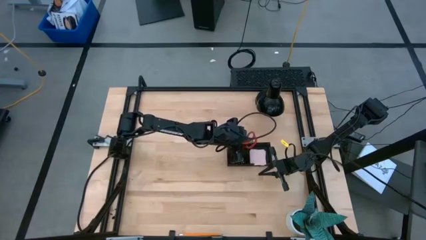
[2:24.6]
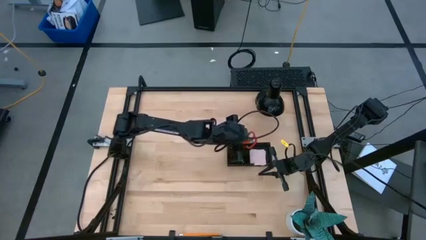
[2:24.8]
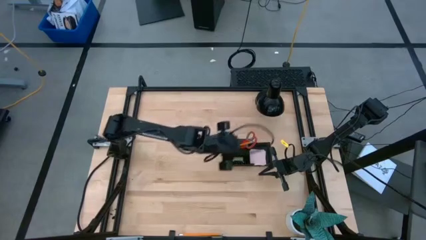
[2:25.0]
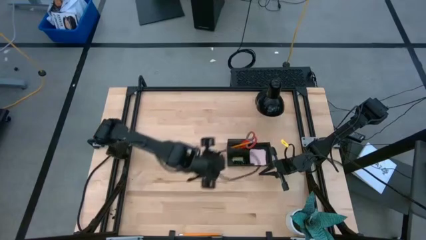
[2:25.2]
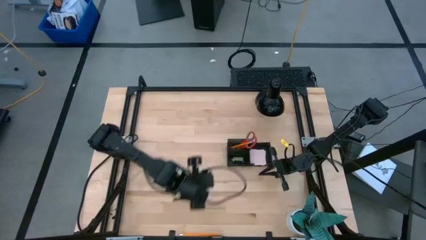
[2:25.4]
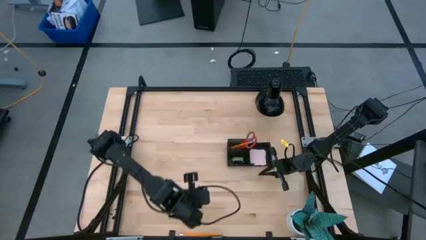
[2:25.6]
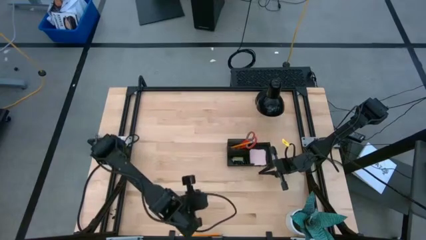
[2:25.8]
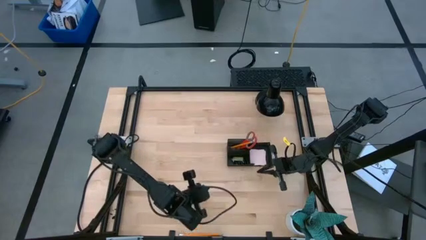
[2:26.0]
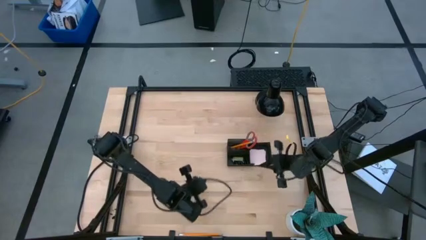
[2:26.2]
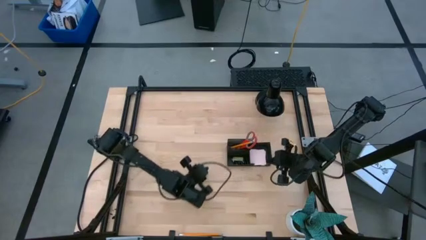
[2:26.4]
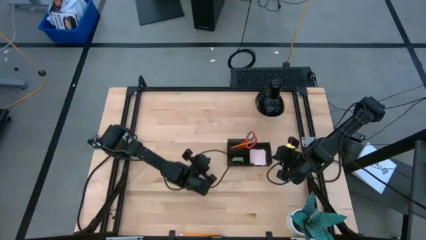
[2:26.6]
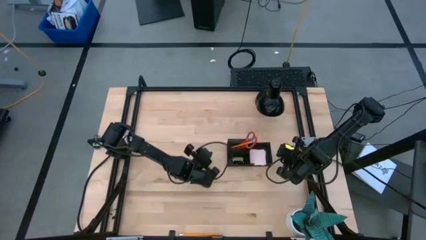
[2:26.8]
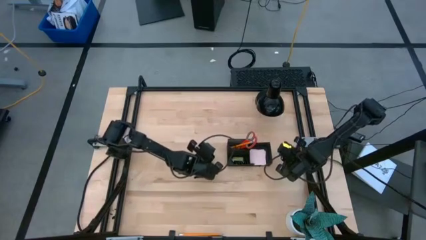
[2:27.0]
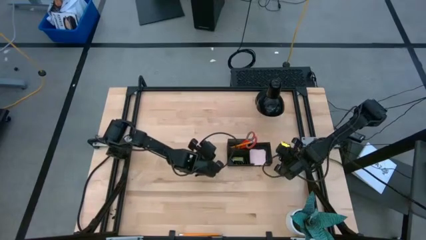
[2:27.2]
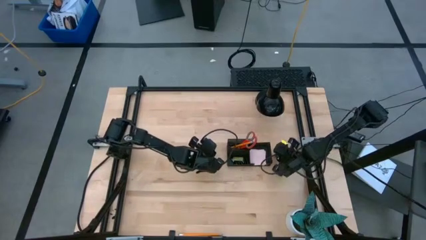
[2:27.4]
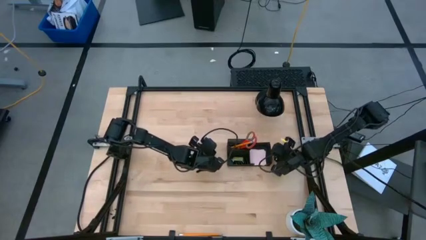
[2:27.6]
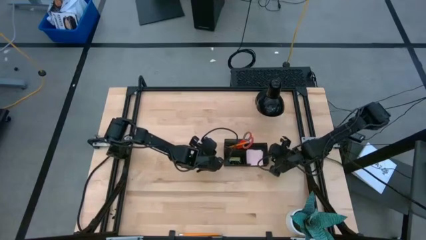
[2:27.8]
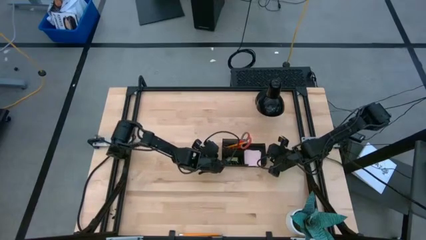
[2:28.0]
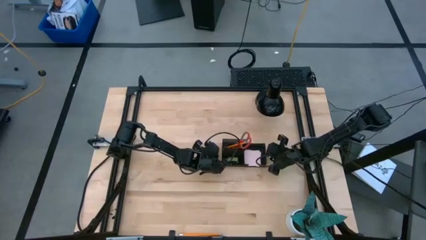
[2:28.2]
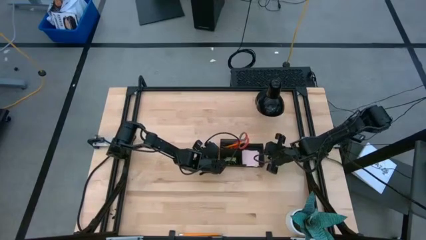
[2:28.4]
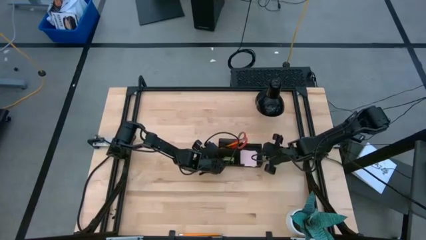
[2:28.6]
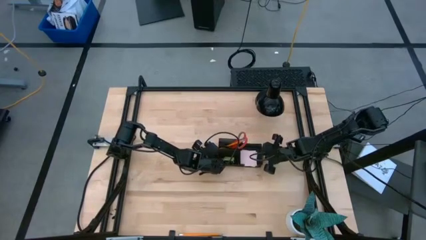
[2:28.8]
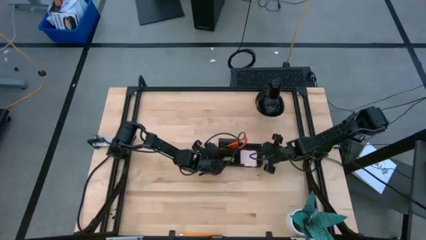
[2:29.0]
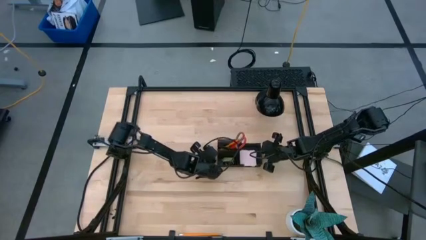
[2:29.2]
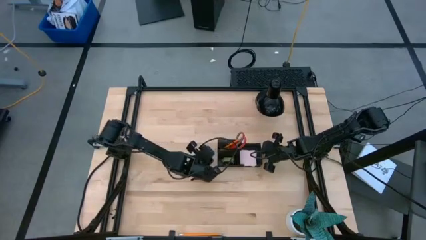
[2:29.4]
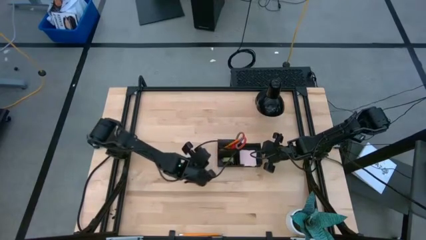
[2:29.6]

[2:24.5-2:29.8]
Task: Pick and place office supplies into organizer
Adjust the black desk organizer

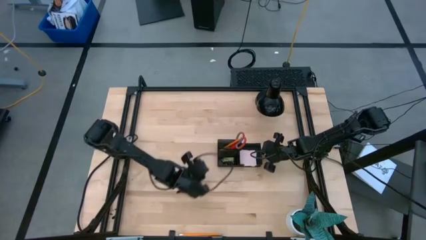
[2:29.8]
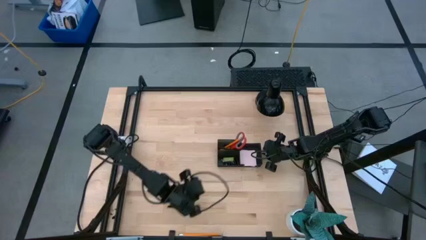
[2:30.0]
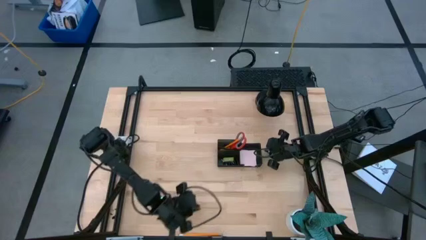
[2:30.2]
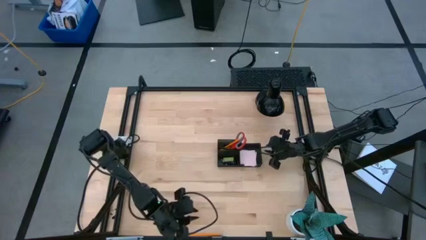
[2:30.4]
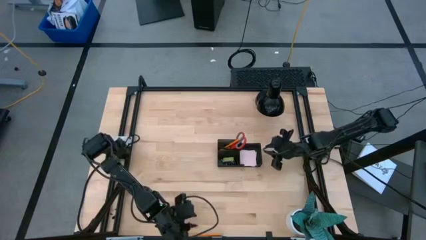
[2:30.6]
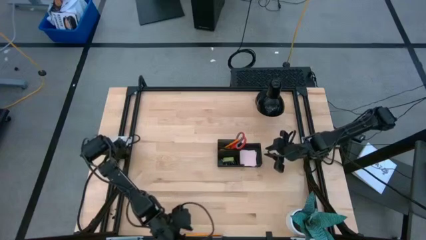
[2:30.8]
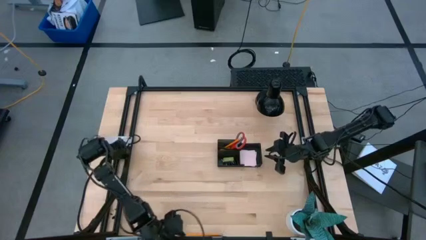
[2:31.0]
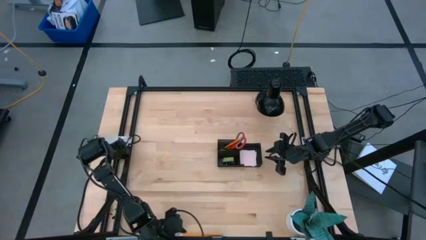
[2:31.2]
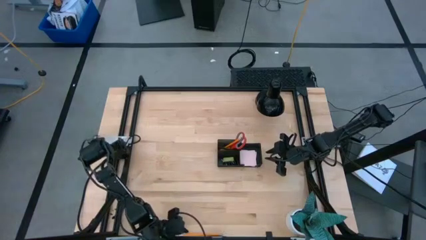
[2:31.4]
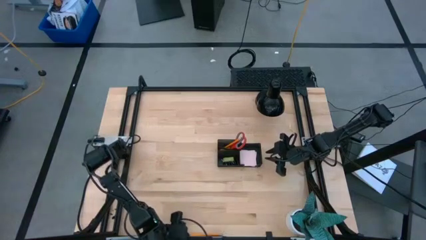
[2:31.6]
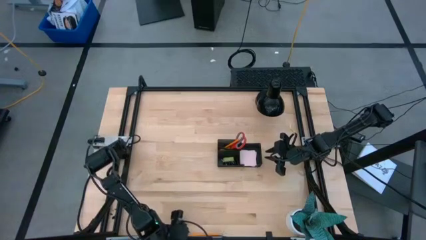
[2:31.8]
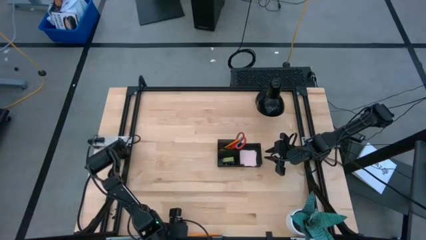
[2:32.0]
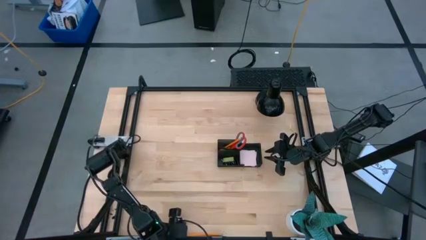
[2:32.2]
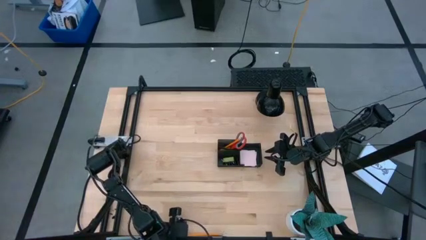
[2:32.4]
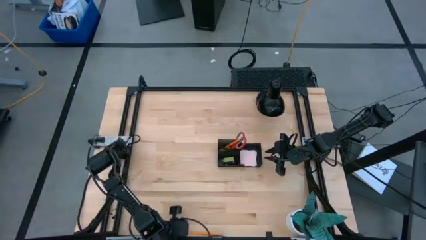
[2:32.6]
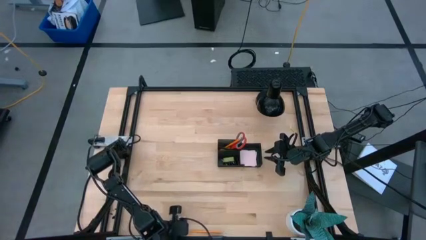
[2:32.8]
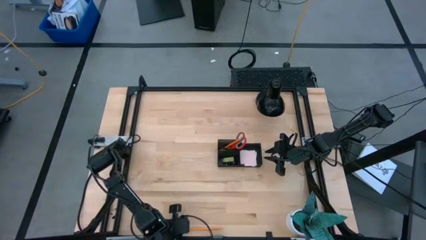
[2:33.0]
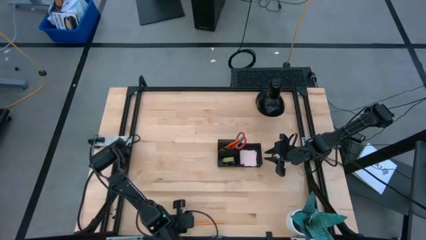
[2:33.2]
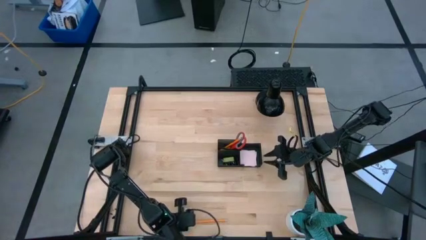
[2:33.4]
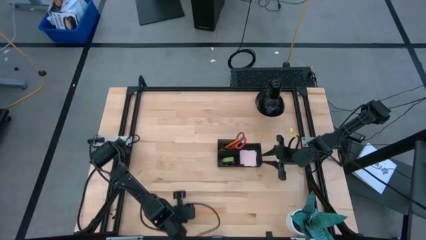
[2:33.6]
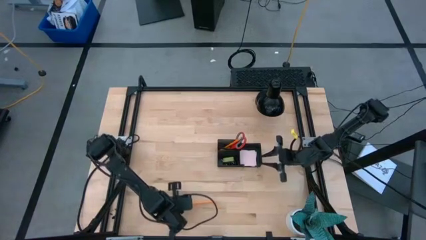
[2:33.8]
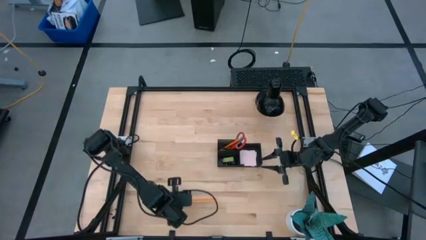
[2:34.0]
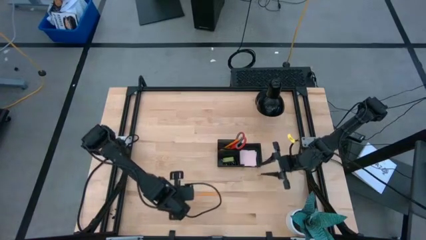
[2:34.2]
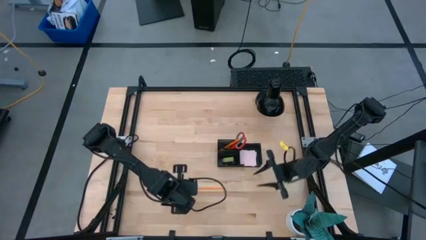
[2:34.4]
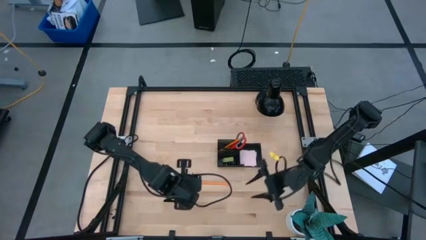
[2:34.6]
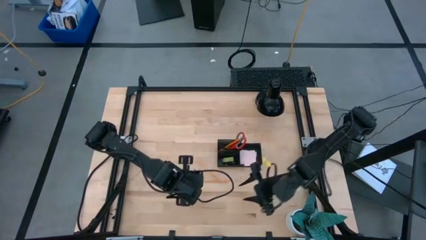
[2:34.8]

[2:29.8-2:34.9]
Put the yellow pencil into the black desk organizer
